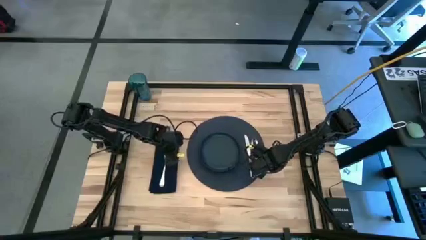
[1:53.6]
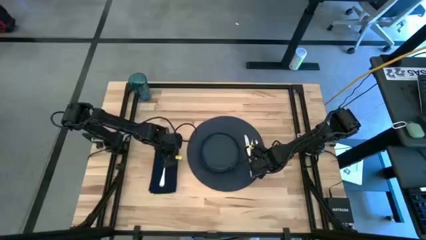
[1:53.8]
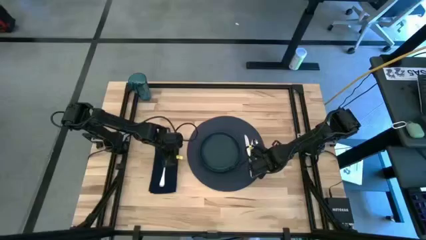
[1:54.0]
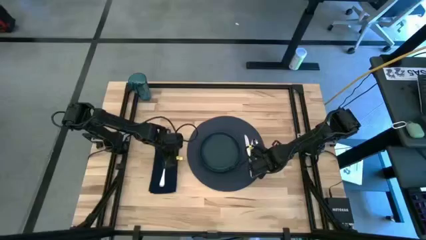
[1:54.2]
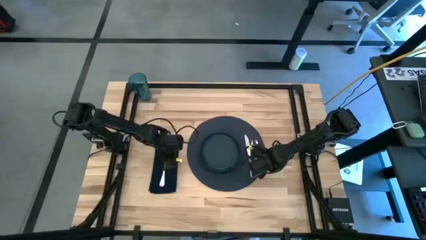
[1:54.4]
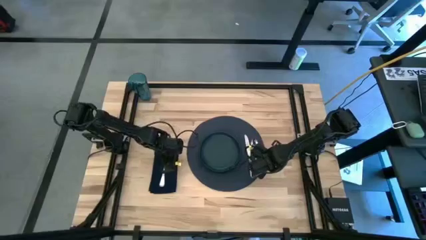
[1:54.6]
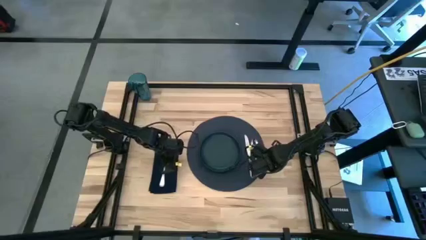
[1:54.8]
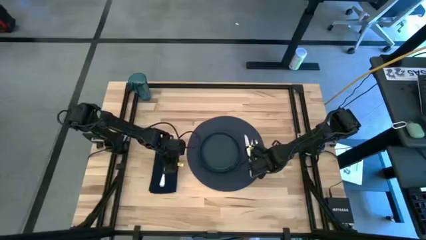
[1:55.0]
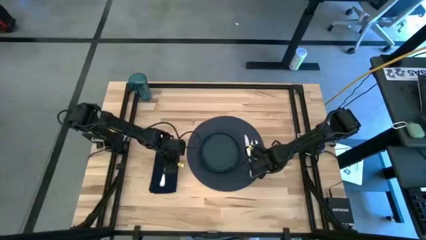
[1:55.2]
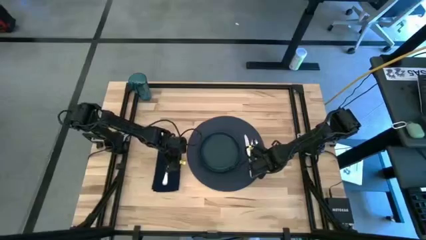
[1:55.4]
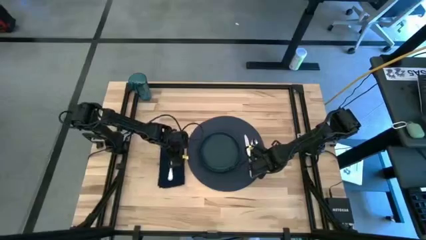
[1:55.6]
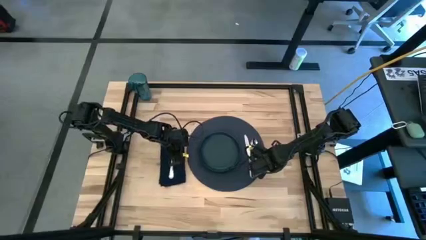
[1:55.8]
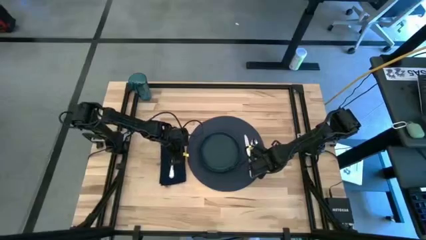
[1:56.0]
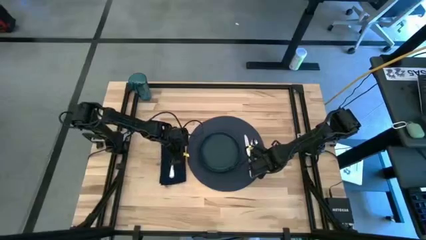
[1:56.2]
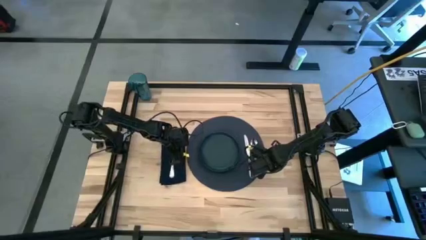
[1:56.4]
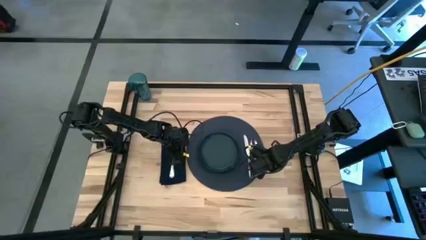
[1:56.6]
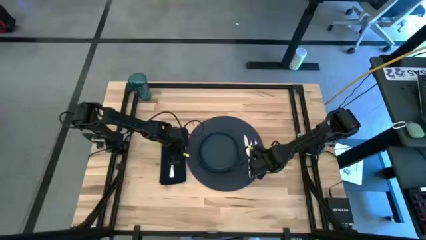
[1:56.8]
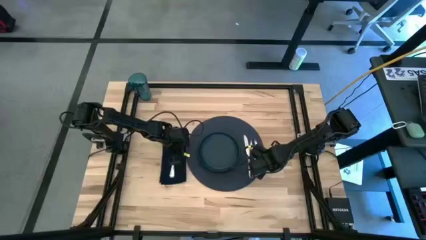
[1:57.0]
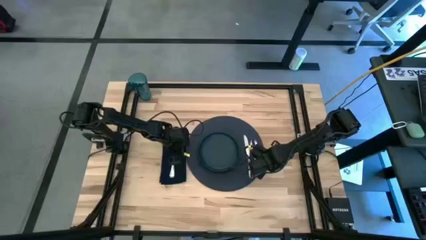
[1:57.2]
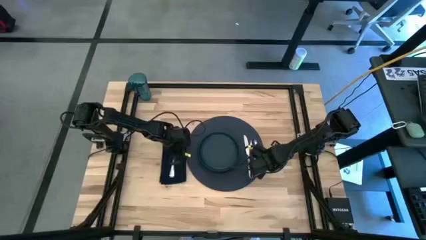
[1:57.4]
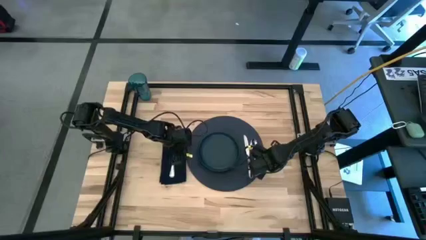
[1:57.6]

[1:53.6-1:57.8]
Task: Set table place
Adjust the black table napkin

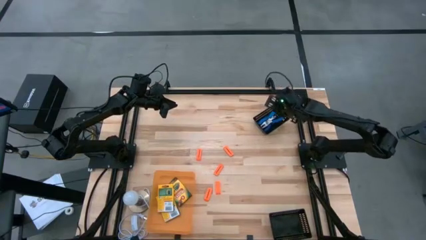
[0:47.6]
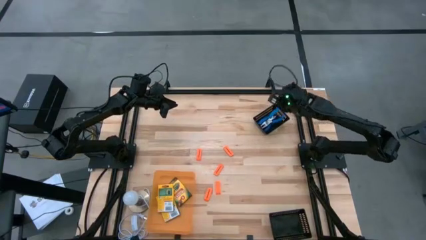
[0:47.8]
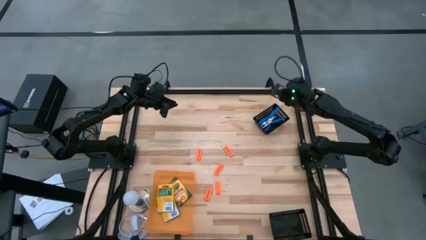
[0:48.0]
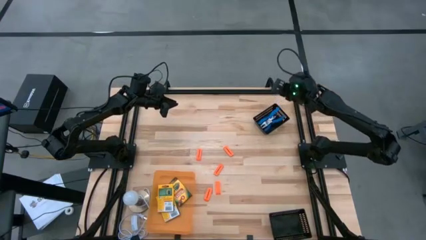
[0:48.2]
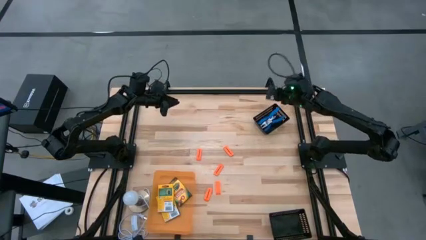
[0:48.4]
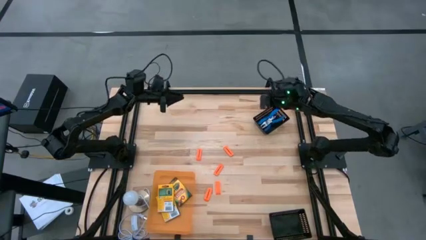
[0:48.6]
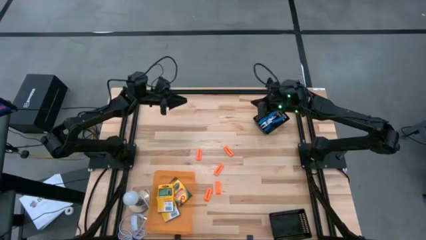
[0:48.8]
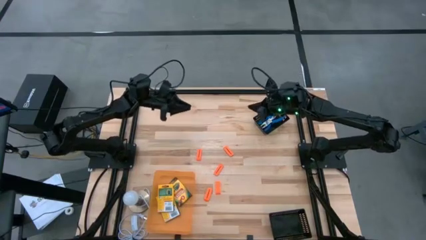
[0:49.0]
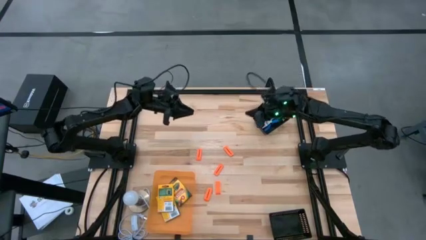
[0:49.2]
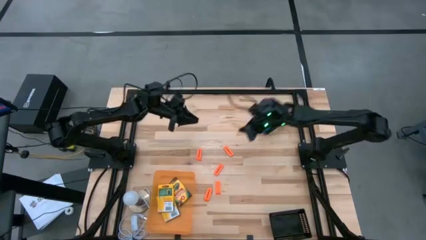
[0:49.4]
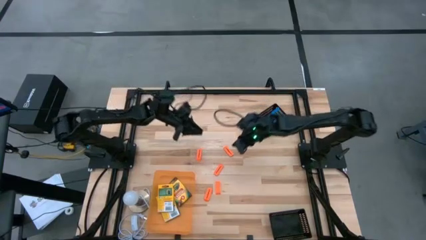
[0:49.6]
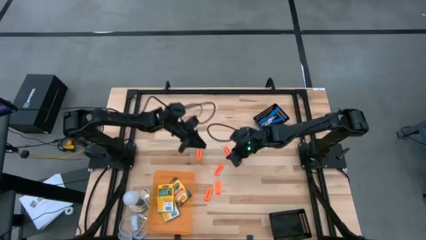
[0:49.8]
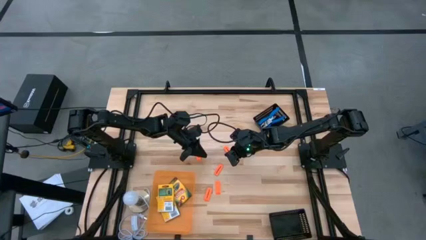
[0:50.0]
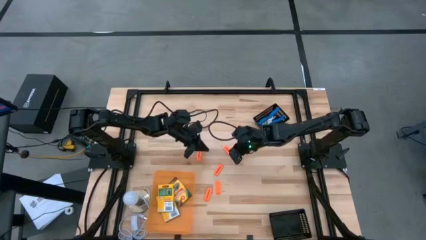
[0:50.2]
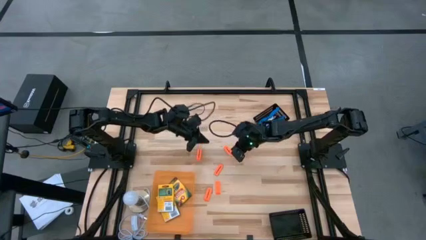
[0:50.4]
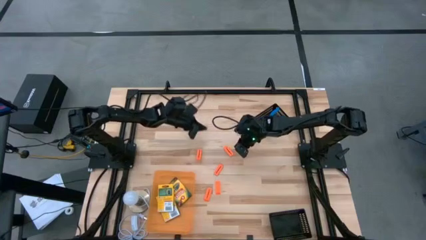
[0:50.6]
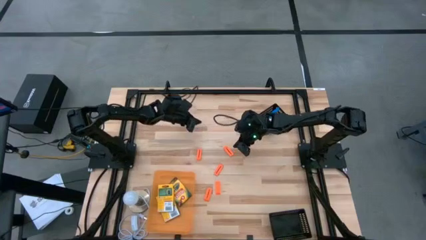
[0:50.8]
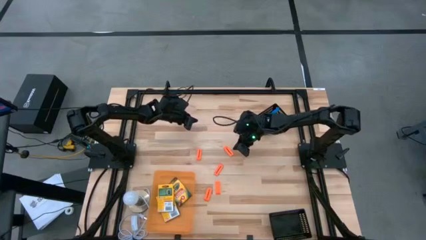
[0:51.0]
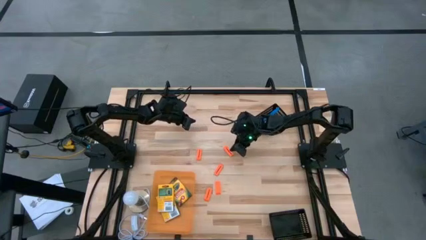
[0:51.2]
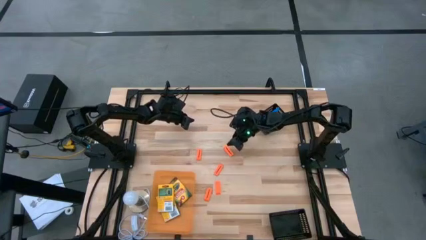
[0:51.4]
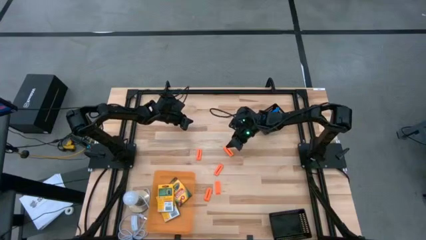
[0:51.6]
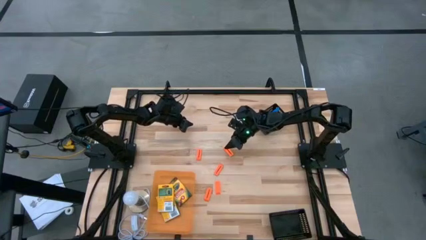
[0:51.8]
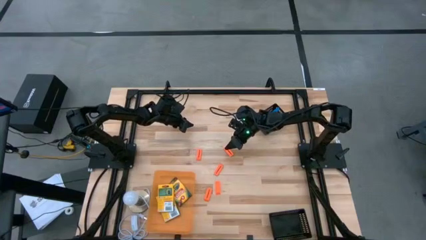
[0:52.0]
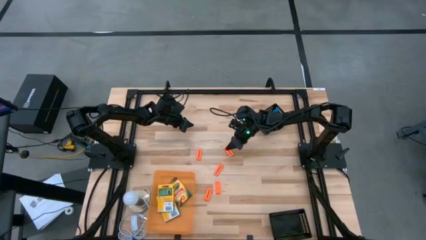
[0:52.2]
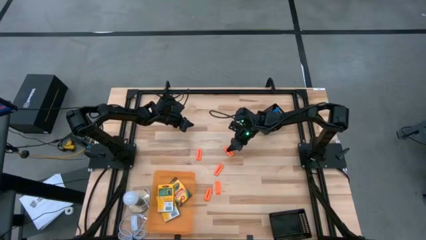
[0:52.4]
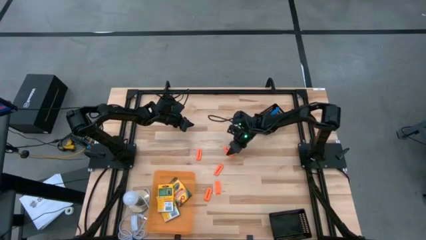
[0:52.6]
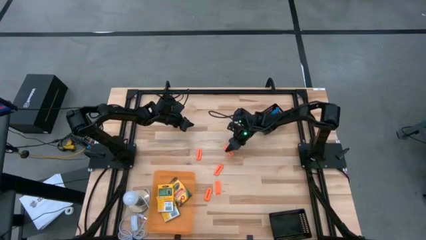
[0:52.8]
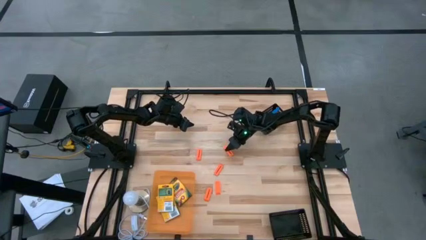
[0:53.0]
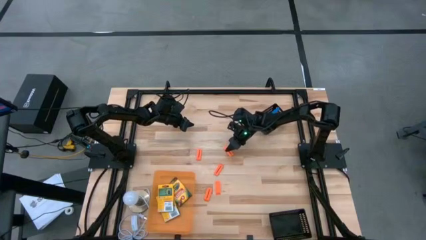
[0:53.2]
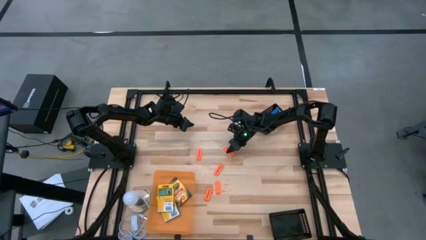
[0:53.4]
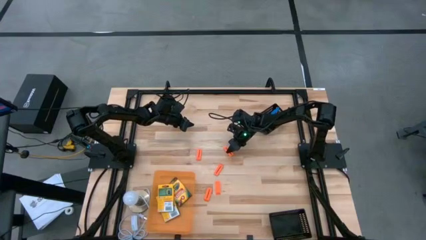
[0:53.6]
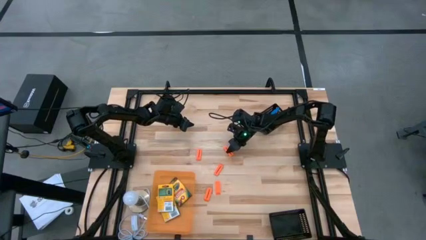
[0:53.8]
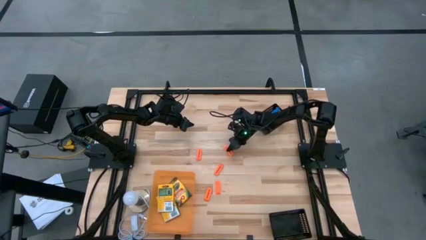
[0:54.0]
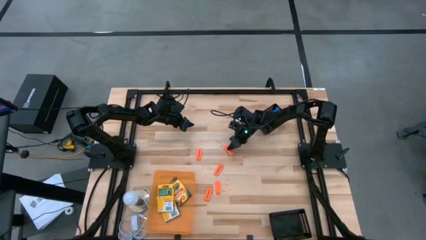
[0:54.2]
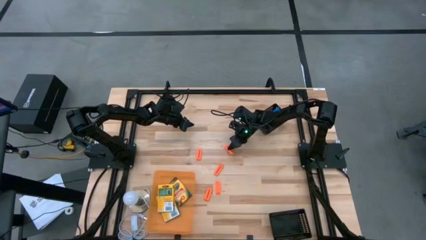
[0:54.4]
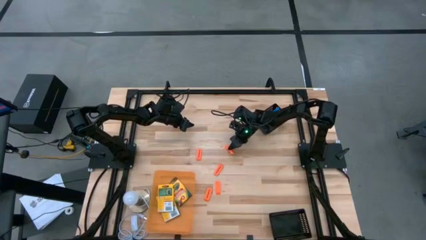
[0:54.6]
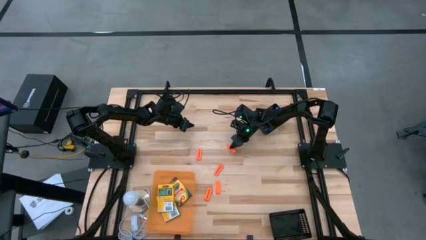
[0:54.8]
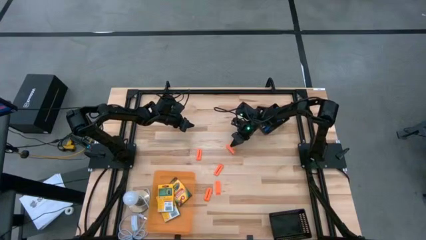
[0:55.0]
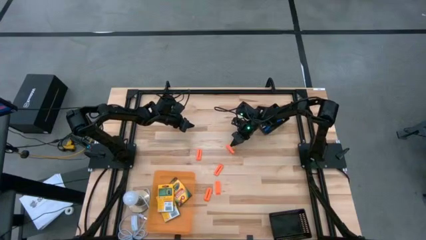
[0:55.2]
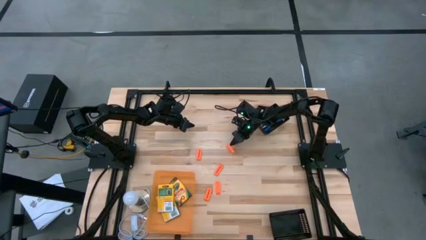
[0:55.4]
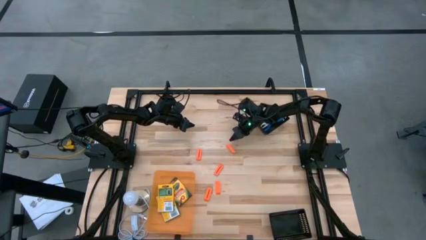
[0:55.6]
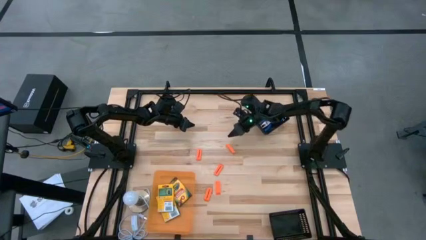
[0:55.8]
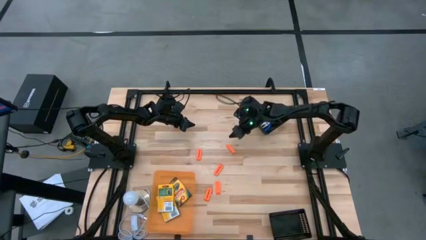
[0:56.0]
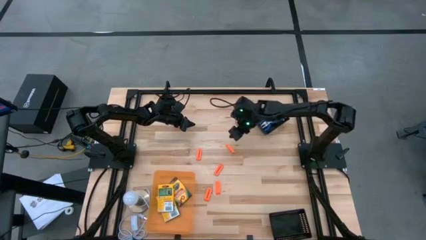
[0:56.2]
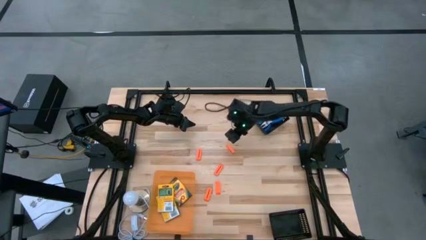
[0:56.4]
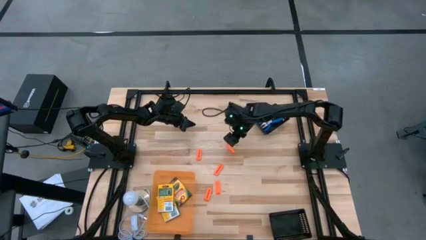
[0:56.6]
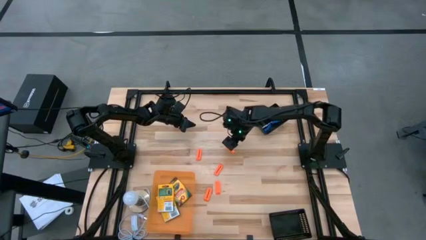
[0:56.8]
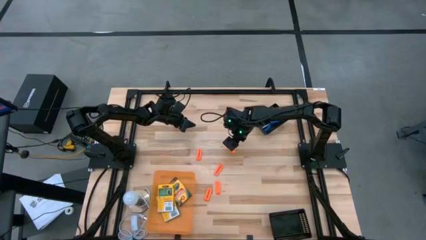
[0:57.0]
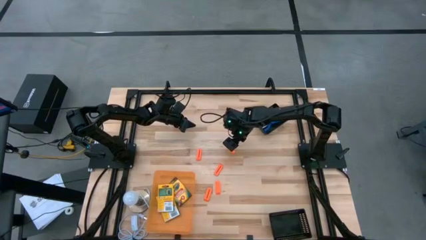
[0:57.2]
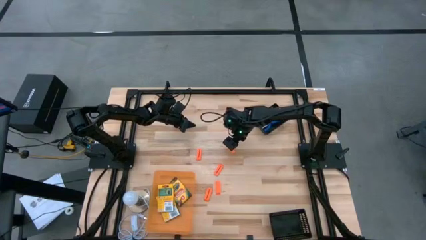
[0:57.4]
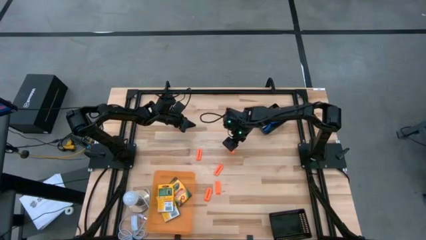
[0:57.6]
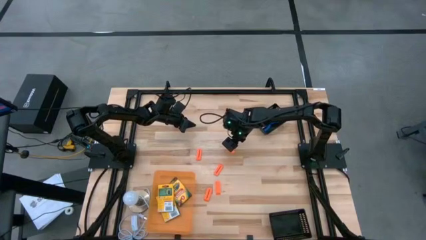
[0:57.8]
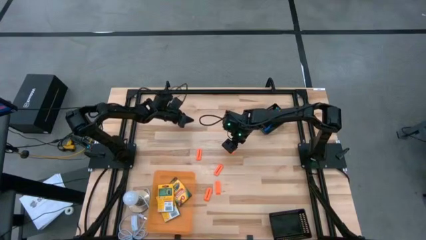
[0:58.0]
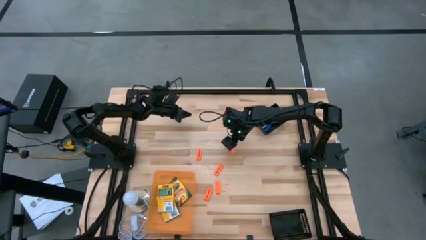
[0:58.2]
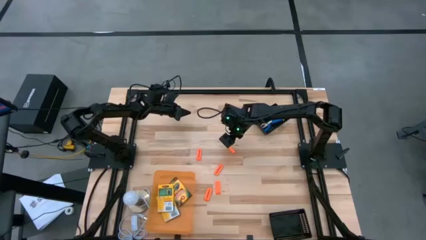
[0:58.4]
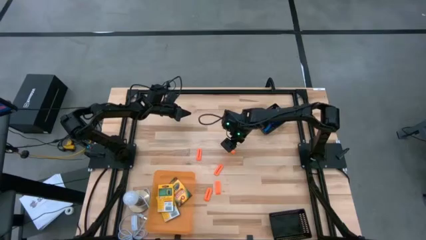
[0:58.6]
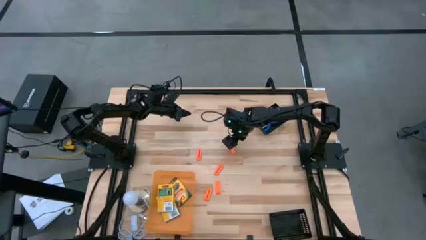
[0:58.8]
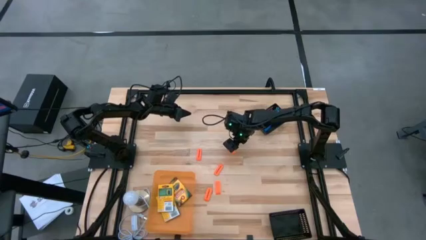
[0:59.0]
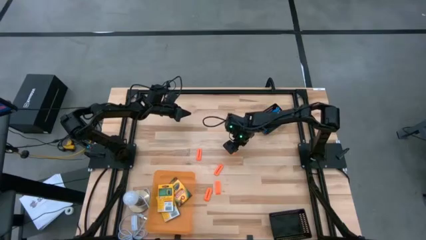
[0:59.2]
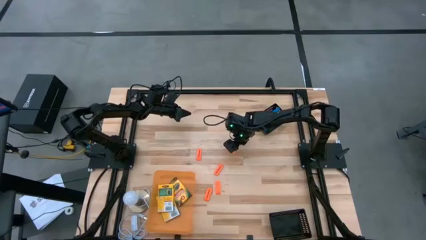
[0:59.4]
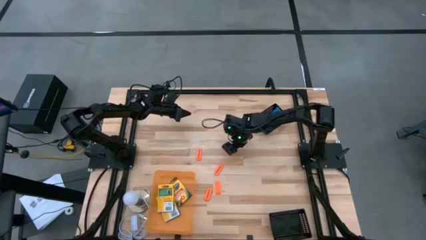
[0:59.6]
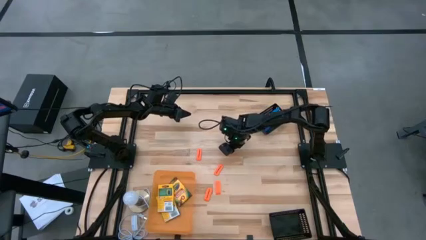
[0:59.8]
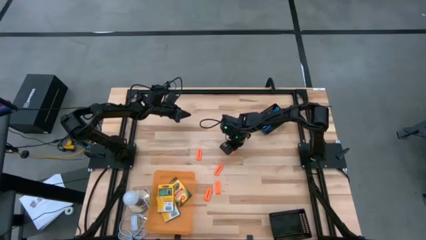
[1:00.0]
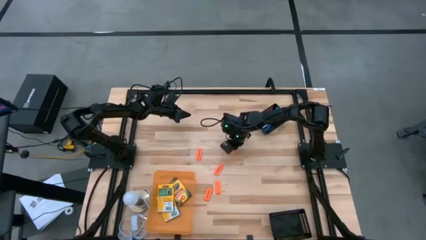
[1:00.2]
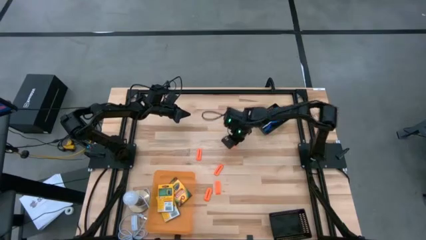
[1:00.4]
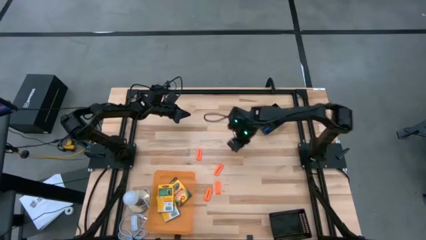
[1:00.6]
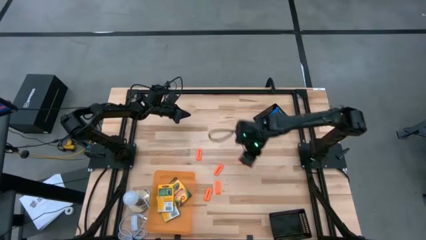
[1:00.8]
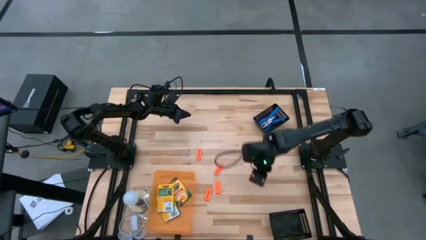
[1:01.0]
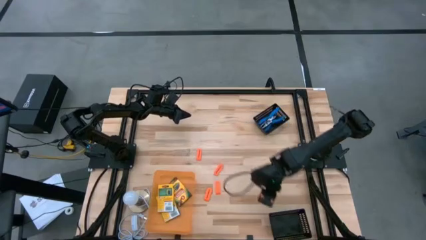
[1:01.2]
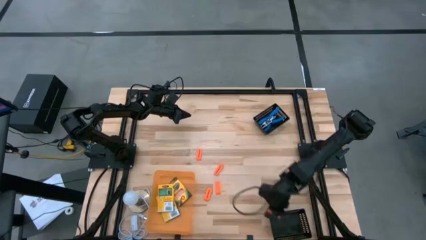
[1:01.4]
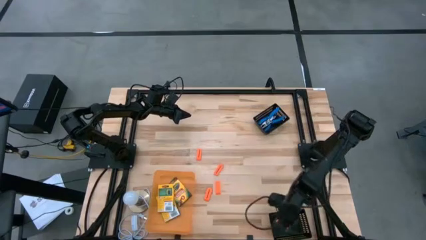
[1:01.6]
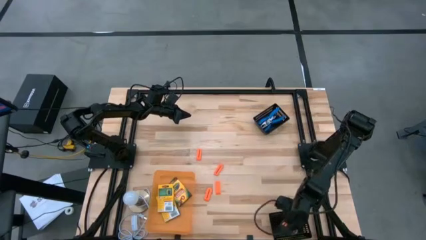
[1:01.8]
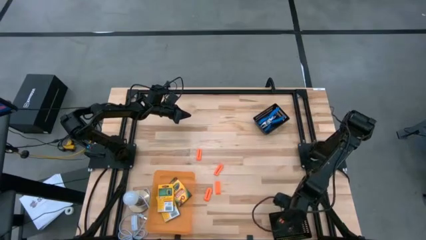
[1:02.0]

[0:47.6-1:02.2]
Task: Pick & Place School Supplies
Put the orange eraser into the bottom black bin
